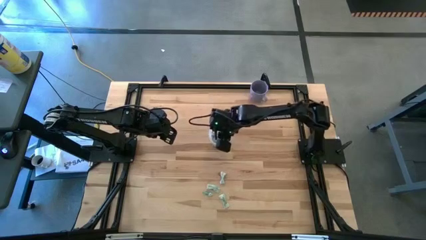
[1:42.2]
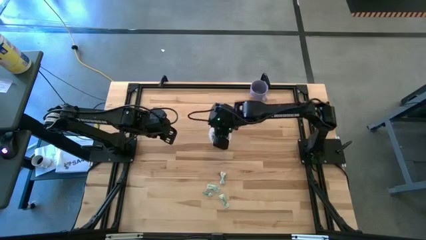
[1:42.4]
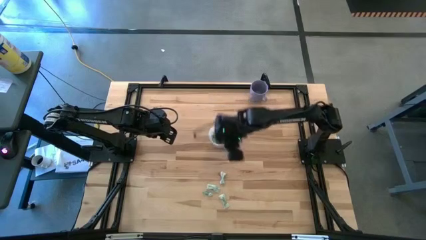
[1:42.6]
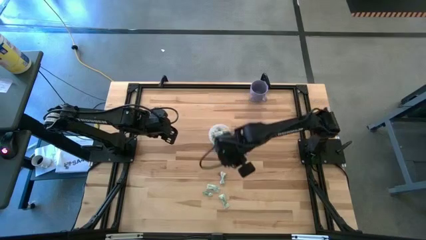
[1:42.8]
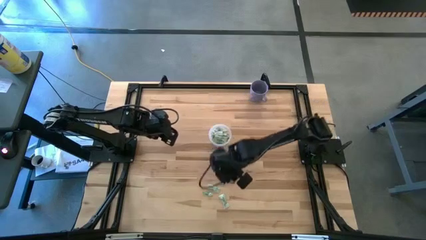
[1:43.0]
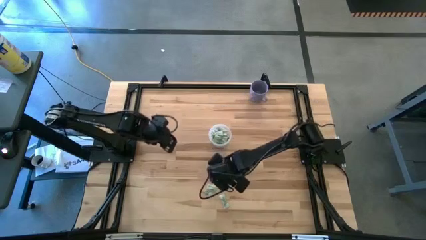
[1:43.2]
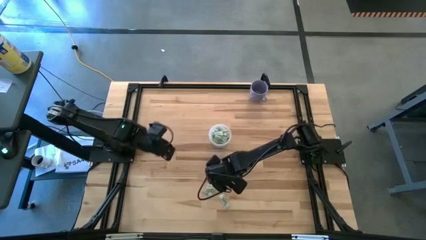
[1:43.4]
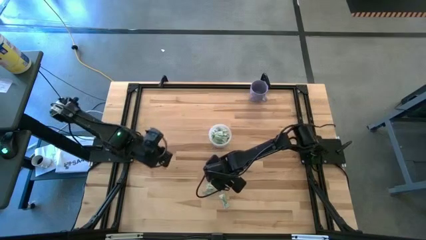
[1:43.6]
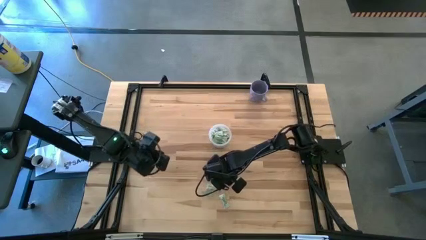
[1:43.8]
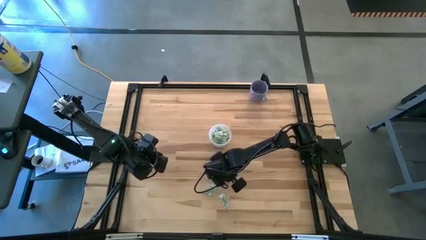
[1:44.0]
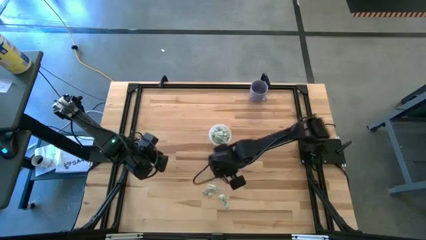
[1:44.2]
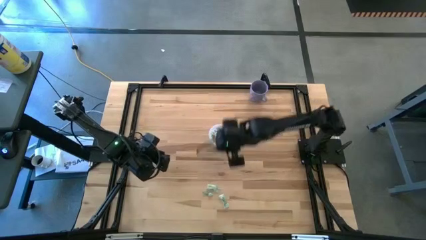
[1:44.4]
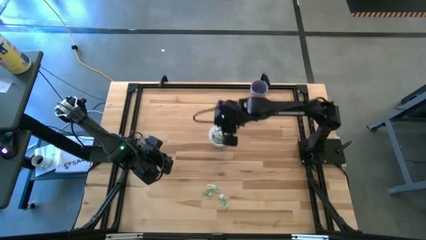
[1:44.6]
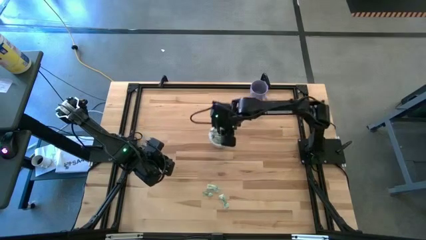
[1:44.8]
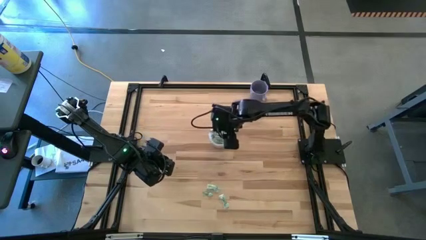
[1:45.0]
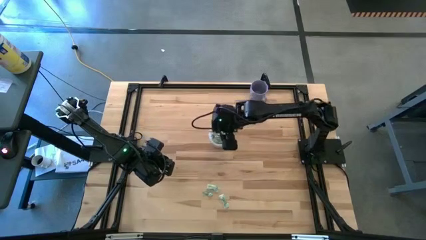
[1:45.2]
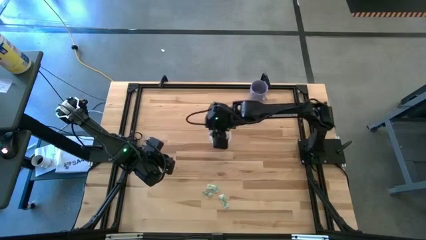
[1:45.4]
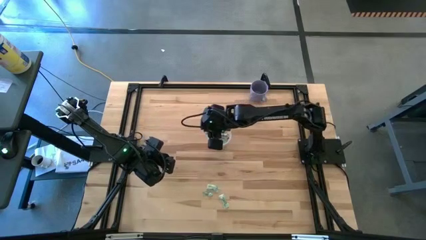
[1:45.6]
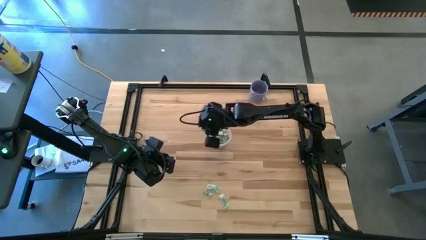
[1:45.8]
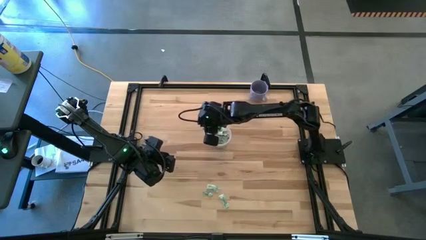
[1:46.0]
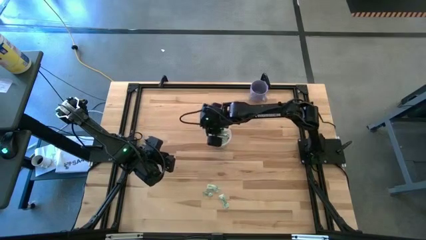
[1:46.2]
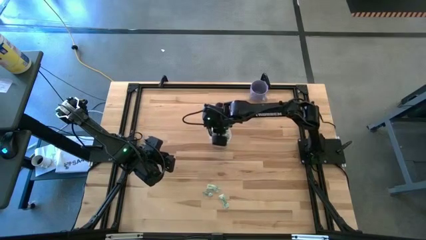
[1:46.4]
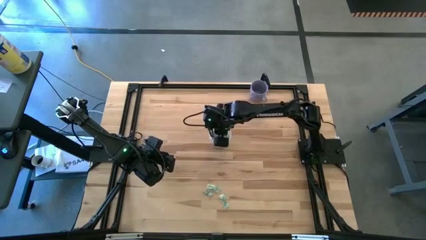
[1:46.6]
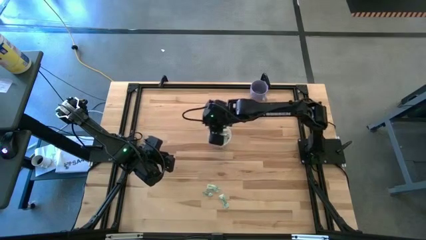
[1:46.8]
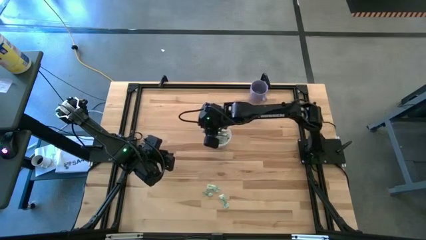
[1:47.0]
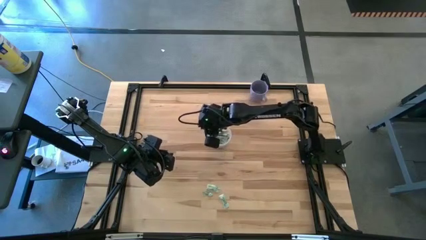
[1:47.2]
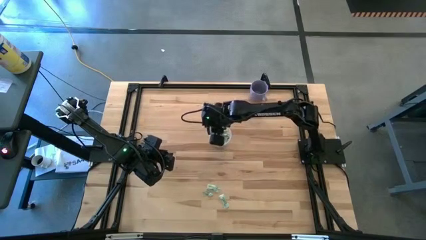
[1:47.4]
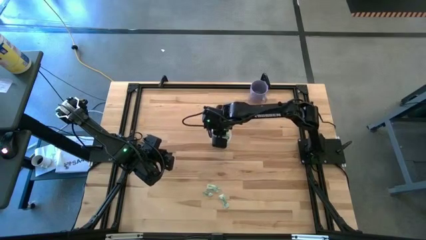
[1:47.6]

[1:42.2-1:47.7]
Task: Pick and place Stevia / Truvia into bins
Put the green stevia packet into the transparent container

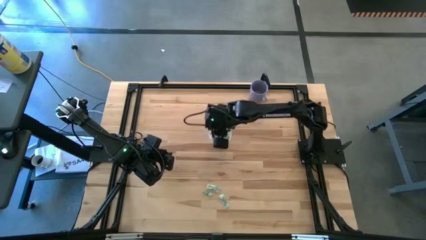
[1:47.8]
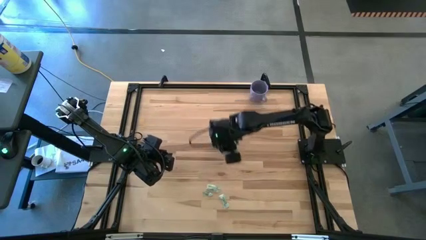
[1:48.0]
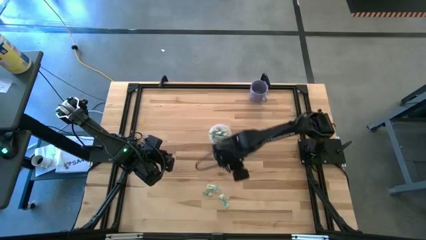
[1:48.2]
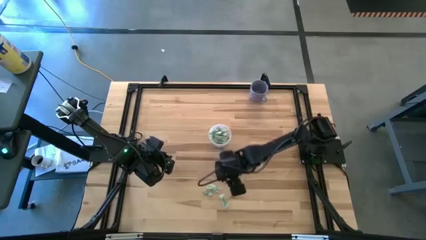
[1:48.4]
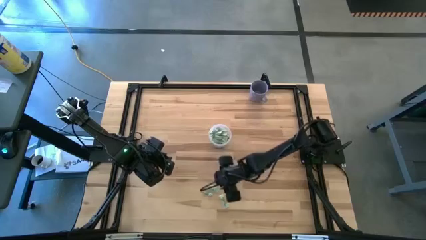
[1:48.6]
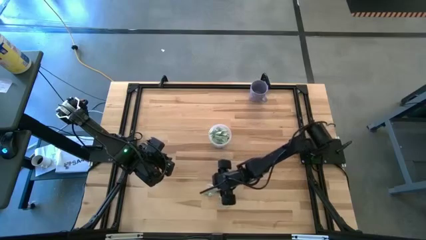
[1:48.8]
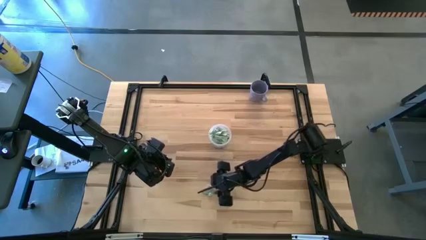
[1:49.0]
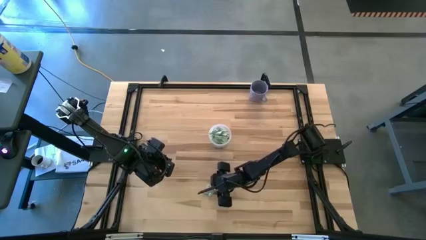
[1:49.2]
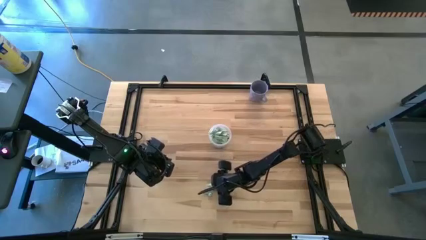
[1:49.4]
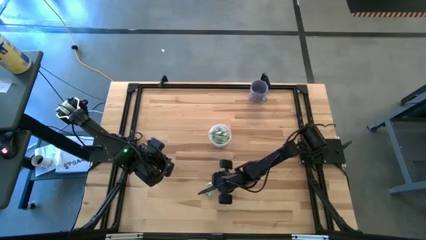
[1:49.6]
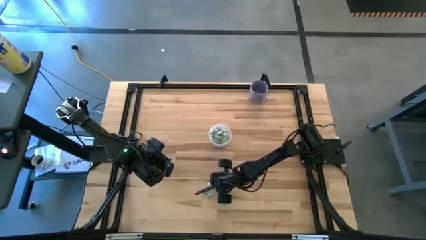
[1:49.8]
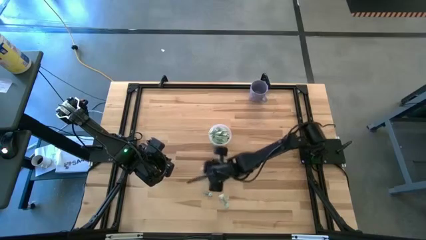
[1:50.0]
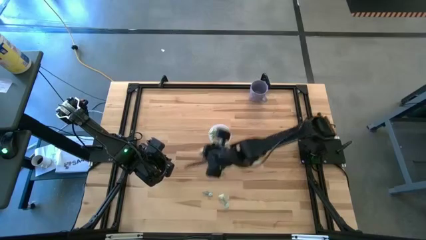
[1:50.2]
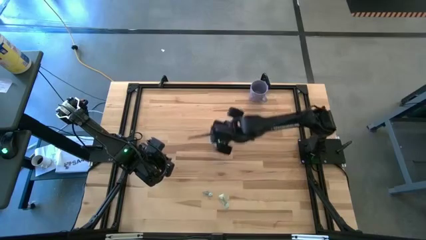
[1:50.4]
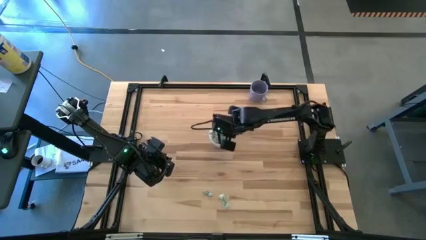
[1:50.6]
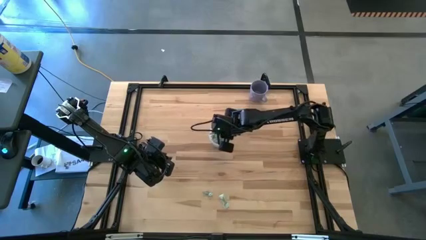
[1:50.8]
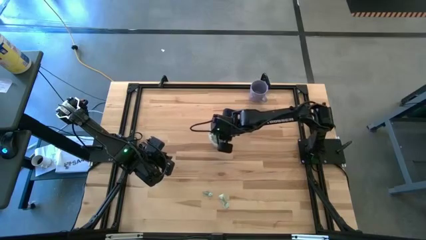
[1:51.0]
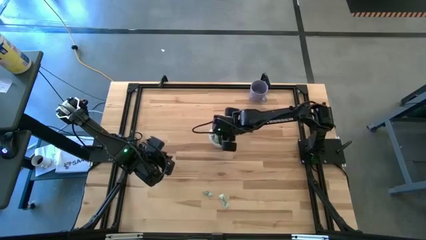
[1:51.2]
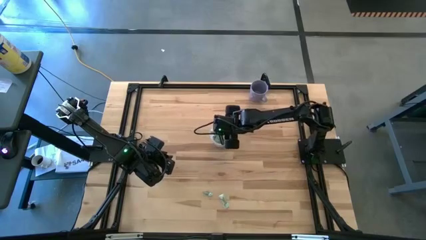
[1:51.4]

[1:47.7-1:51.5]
Put the green stevia packet into the transparent container

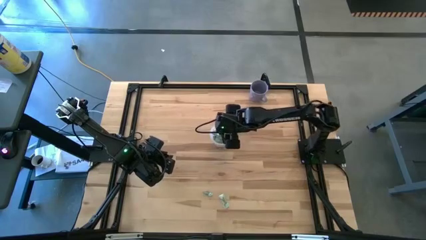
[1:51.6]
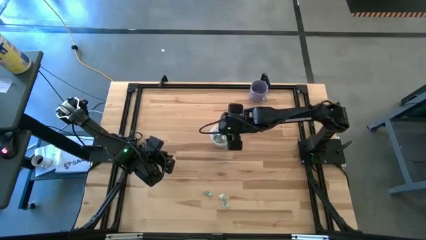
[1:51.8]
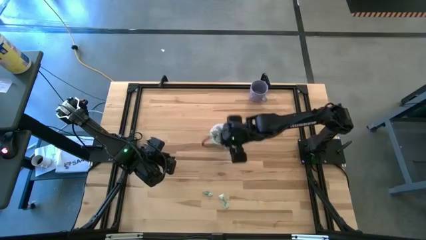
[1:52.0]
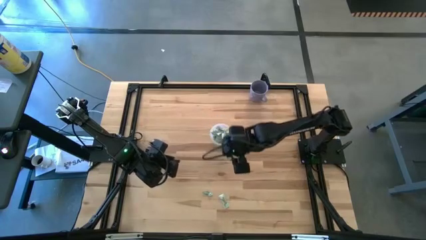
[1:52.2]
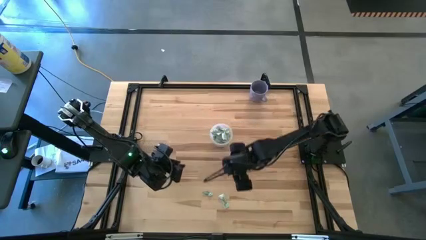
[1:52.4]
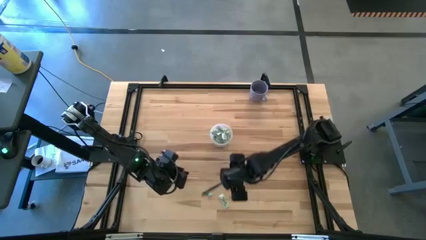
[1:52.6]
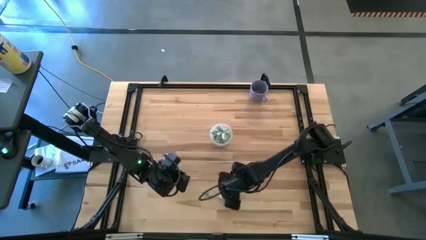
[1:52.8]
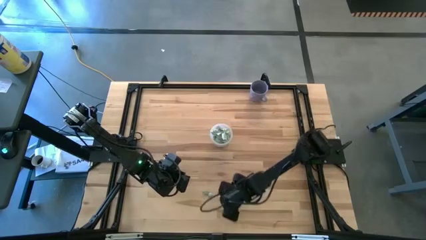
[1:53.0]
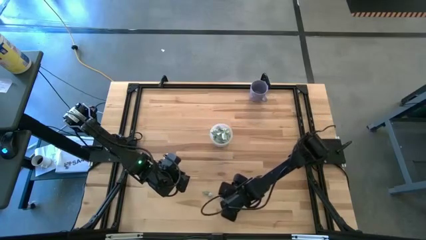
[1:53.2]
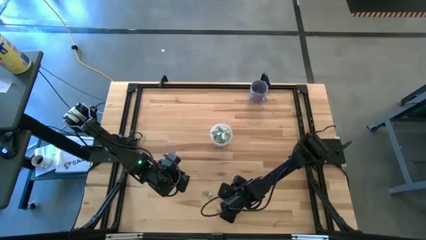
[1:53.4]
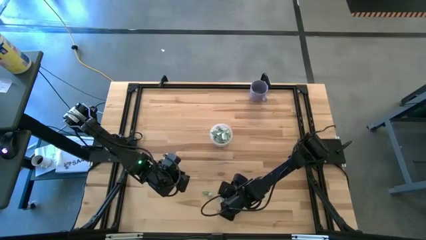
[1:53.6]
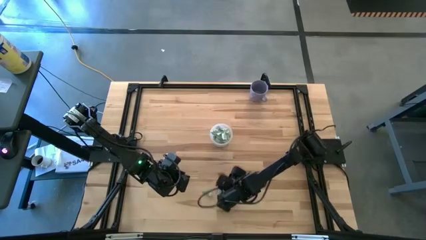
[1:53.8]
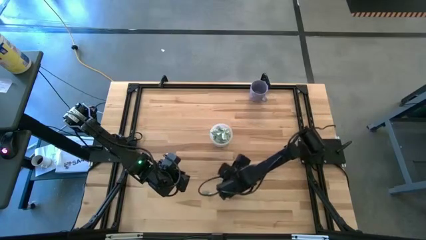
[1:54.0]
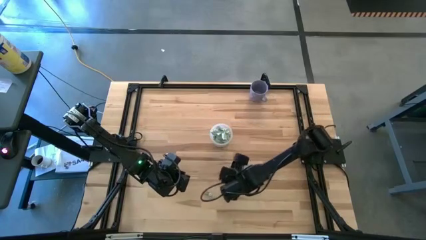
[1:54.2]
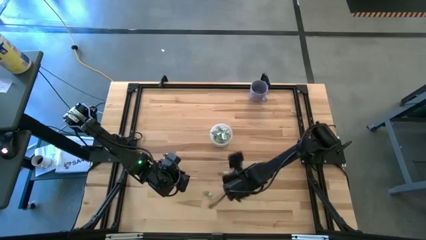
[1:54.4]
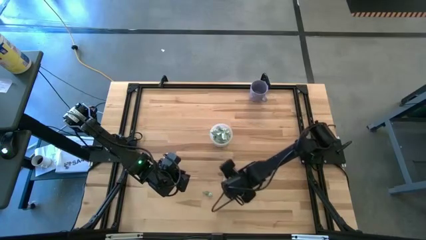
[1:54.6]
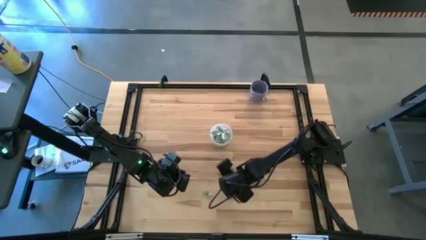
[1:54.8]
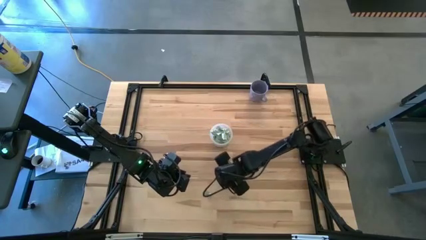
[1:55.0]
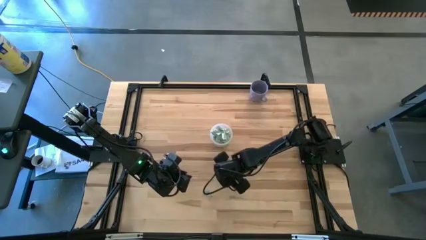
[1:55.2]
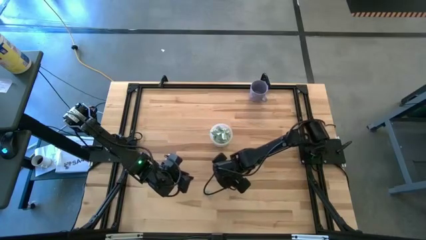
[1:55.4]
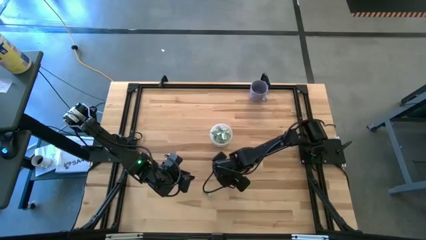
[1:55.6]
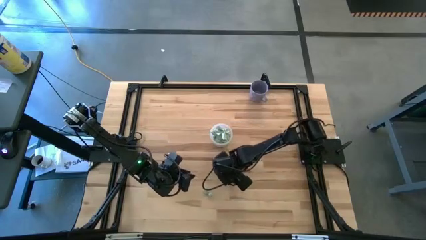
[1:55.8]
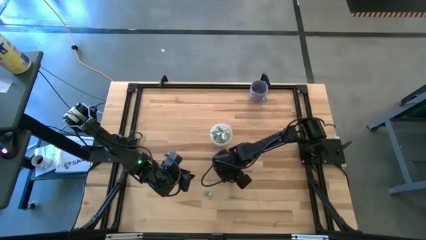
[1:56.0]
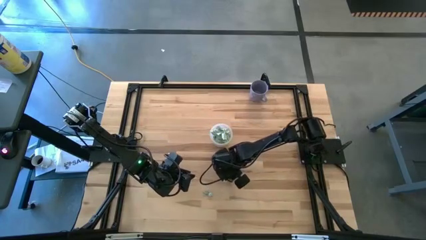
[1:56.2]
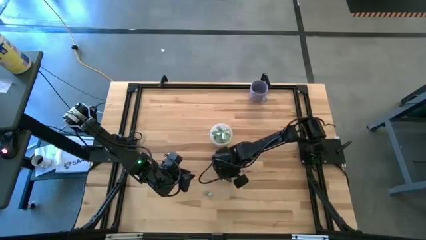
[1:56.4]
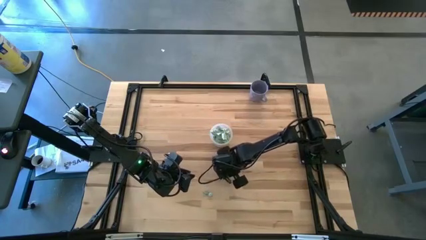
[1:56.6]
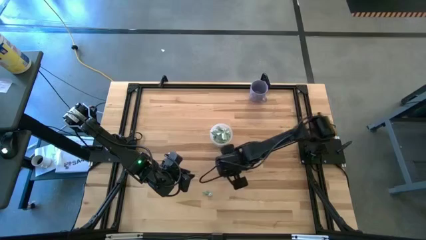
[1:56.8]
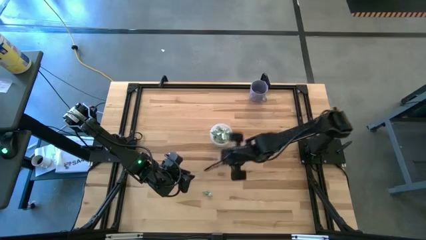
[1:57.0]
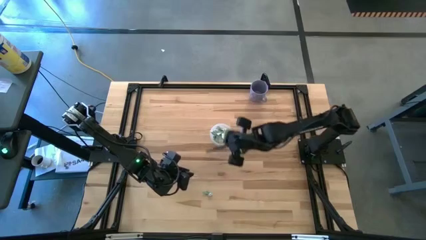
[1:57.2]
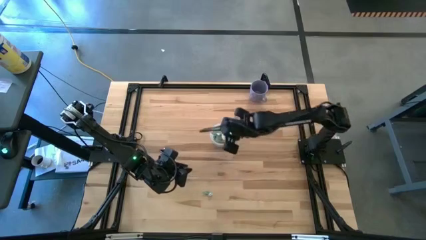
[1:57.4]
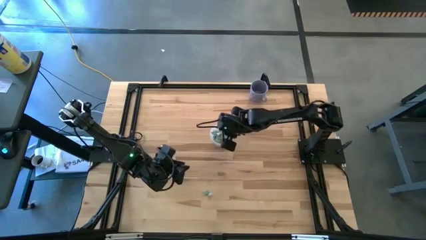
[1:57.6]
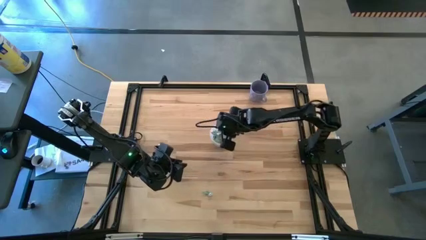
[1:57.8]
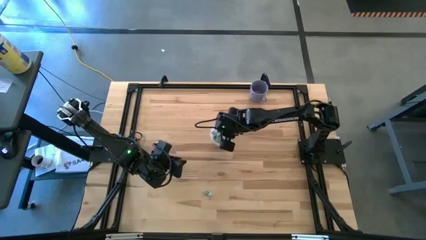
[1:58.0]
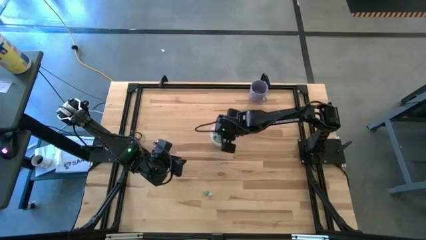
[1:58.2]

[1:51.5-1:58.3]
Put the green stevia packet into the transparent container
